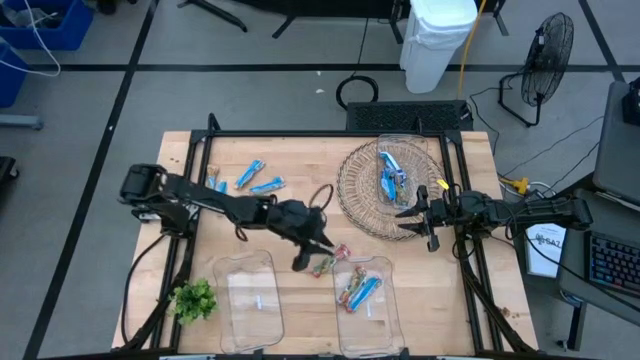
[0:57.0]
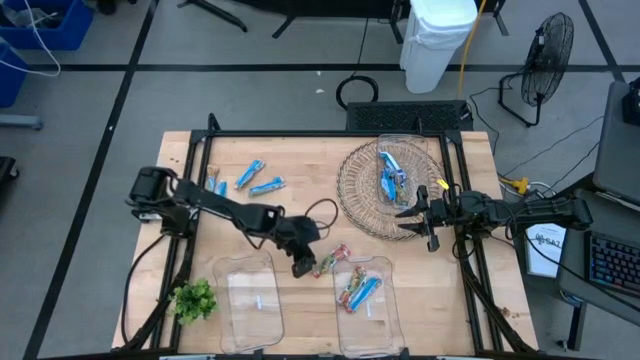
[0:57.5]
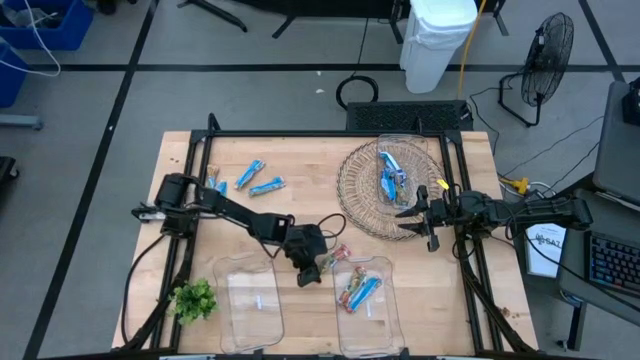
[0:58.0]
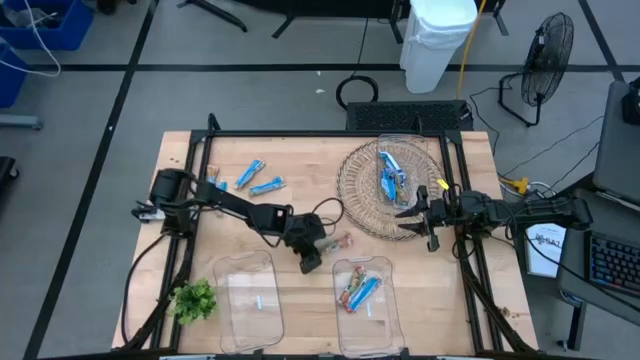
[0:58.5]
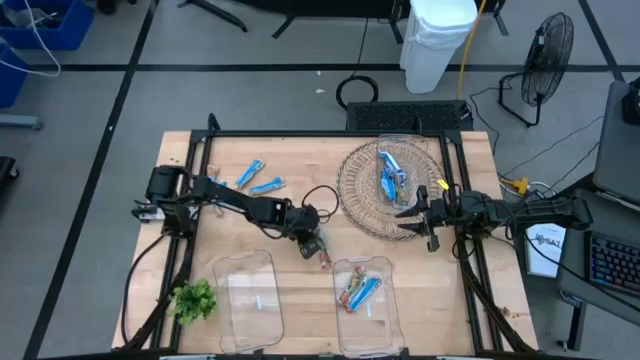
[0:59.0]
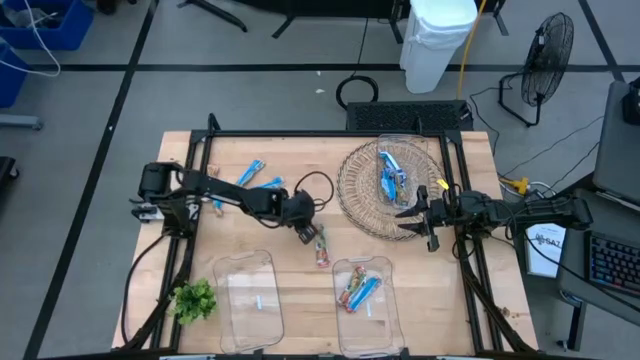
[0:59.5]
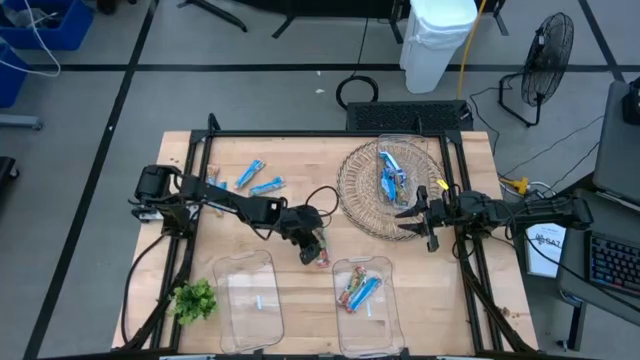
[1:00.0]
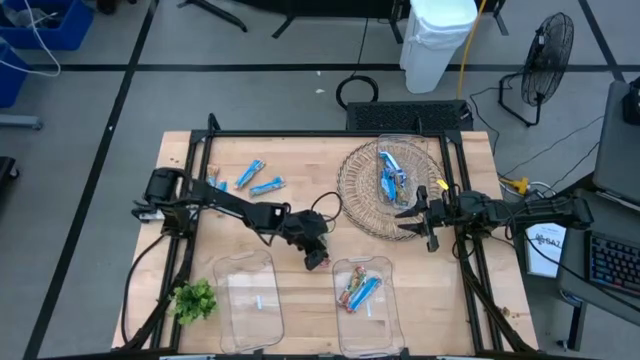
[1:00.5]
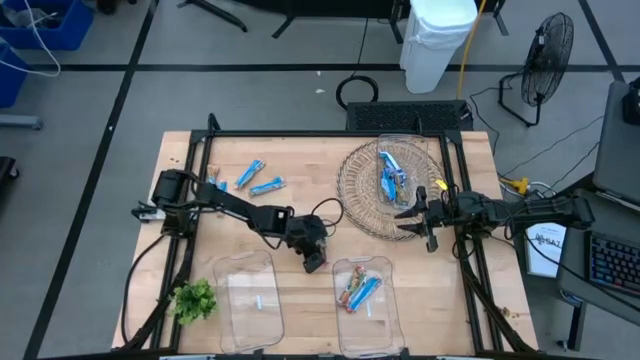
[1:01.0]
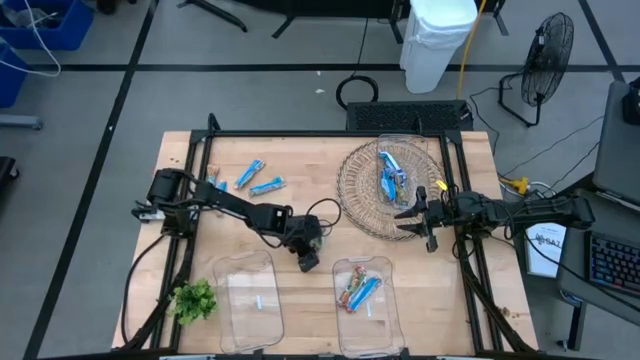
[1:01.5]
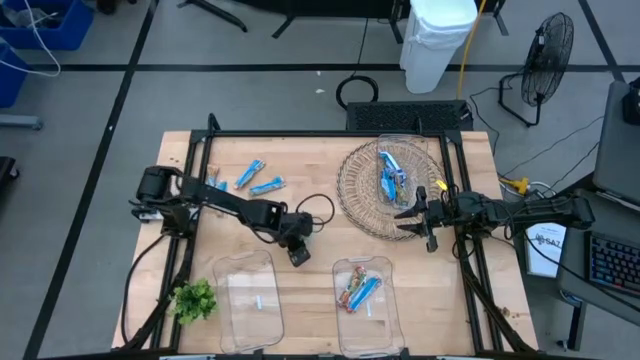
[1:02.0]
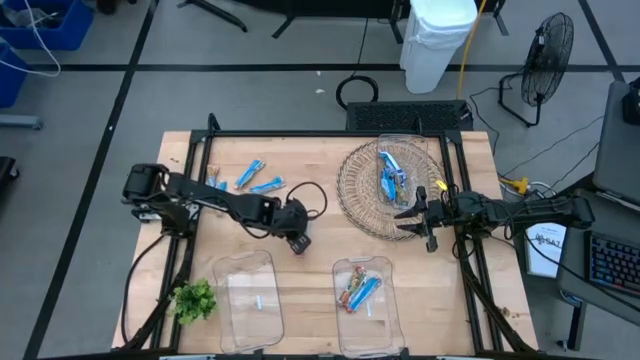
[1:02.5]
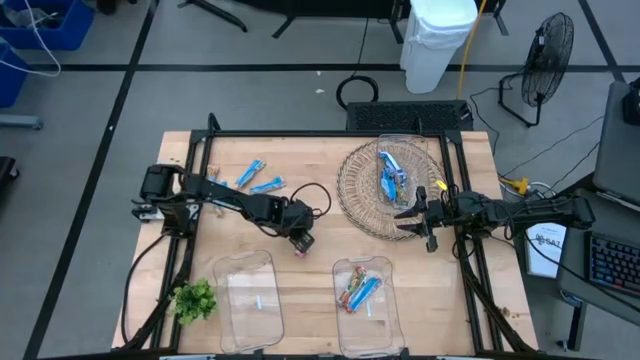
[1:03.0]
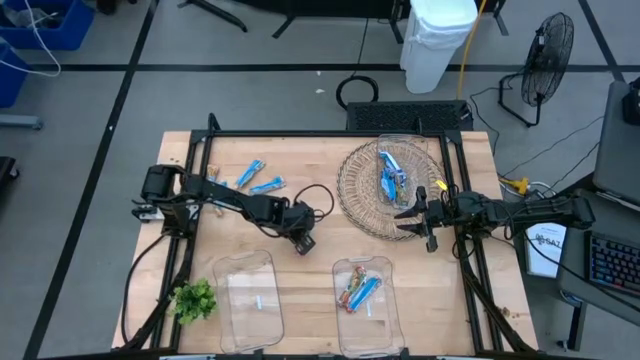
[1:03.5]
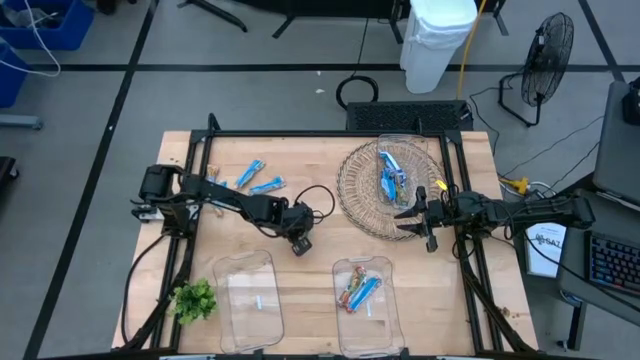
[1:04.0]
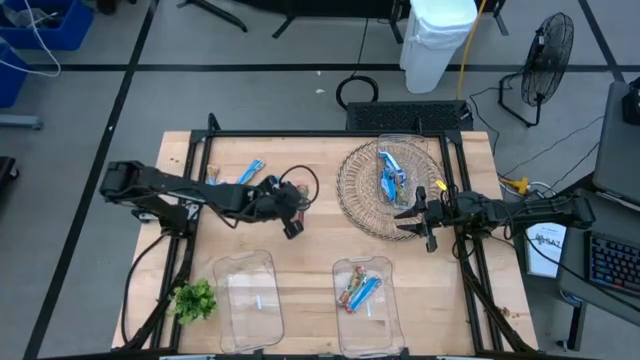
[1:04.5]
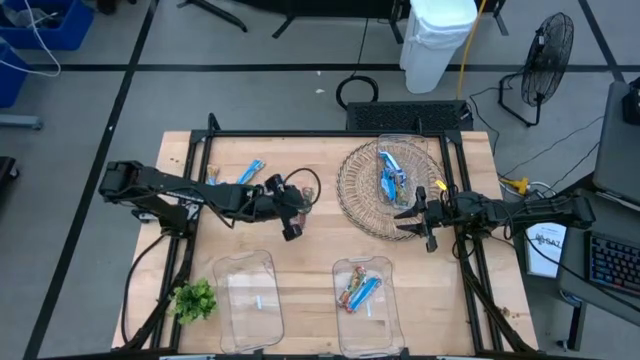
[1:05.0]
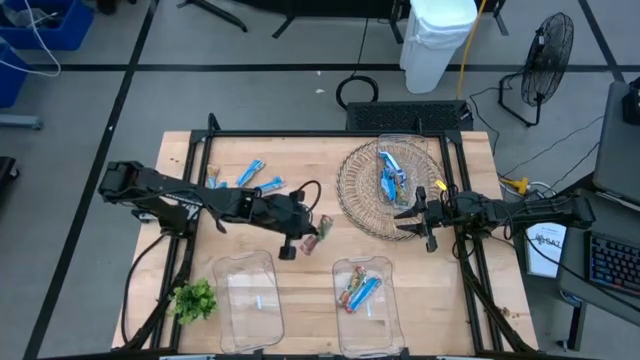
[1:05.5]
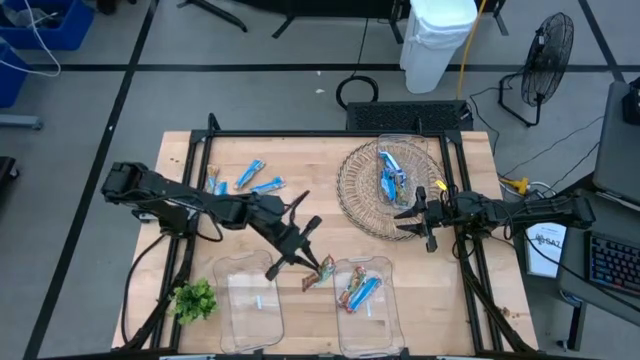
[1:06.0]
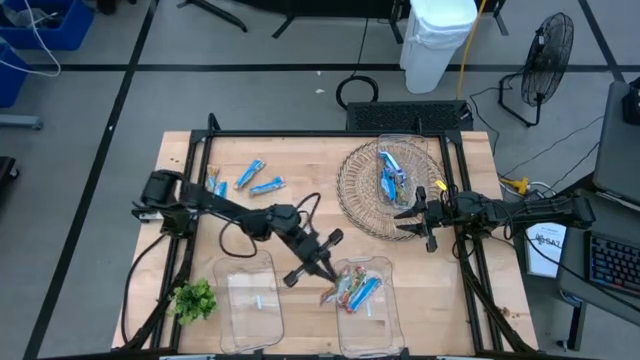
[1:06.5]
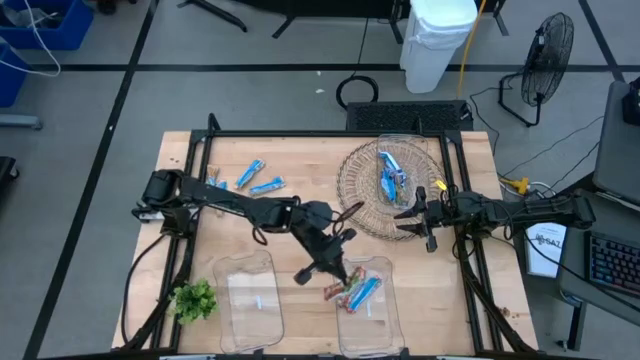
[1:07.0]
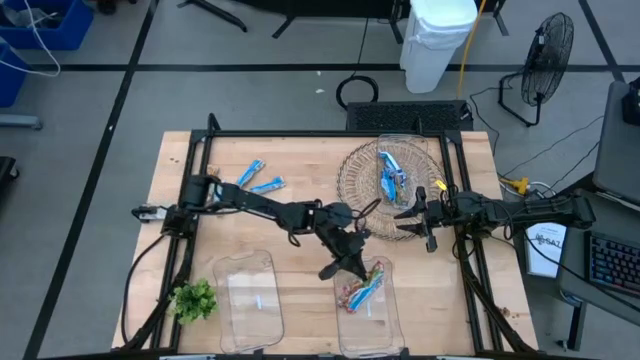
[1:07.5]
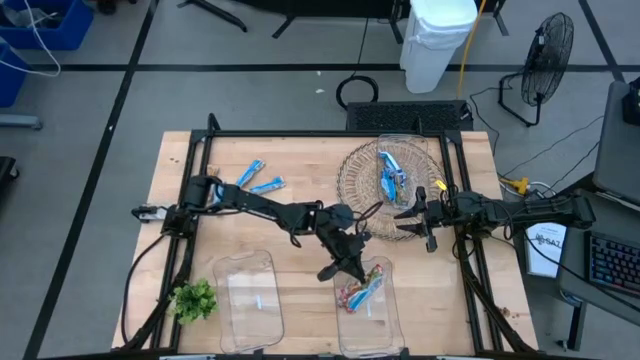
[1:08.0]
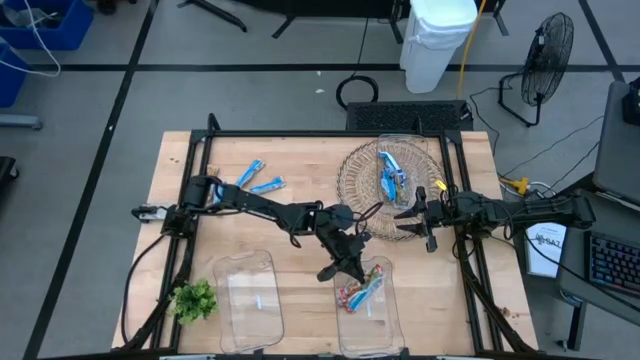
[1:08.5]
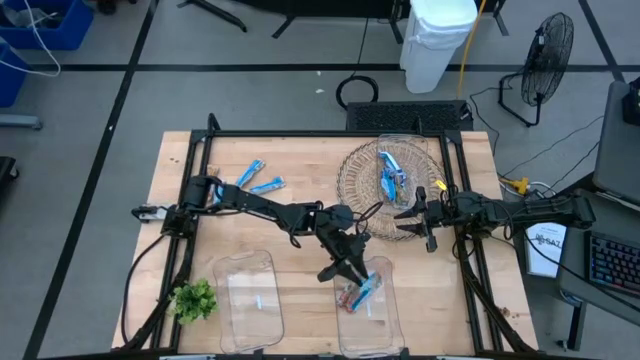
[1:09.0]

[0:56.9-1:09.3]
Task: Pick and place Granola Bars by type
Put the red granola bar into the bottom middle transparent bin

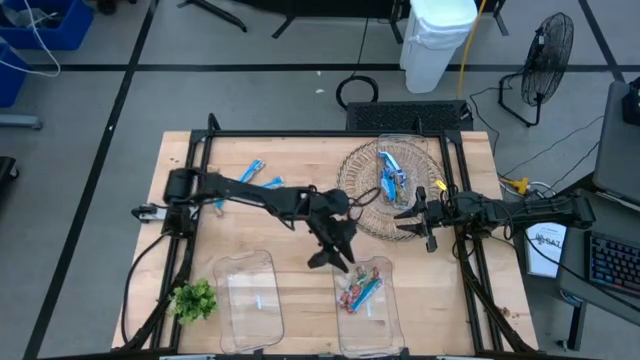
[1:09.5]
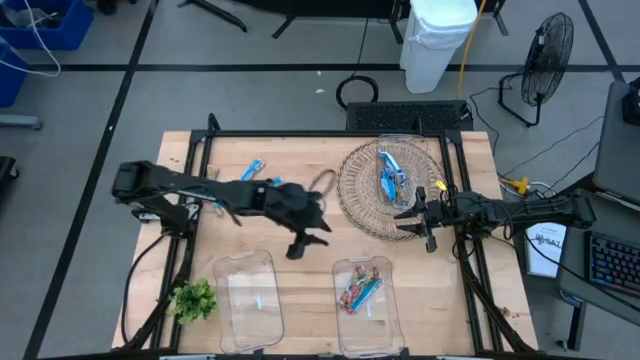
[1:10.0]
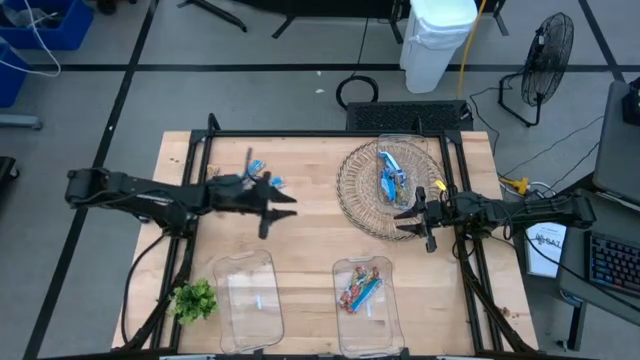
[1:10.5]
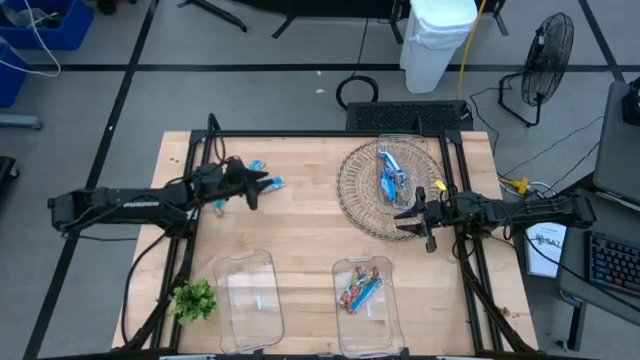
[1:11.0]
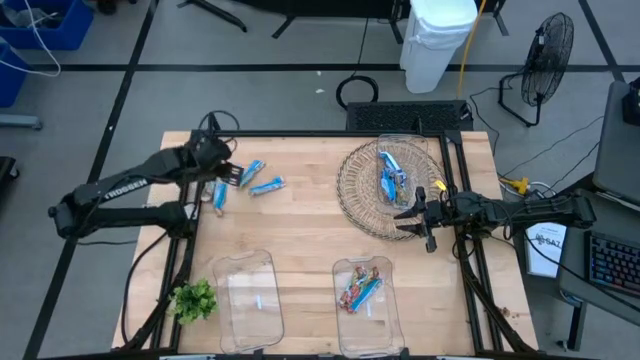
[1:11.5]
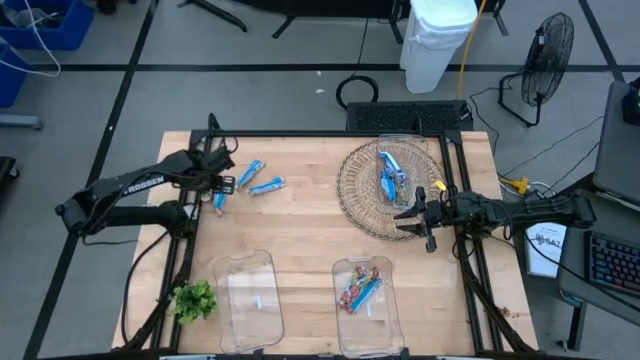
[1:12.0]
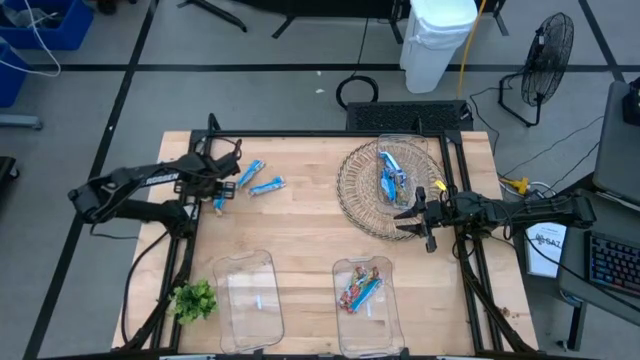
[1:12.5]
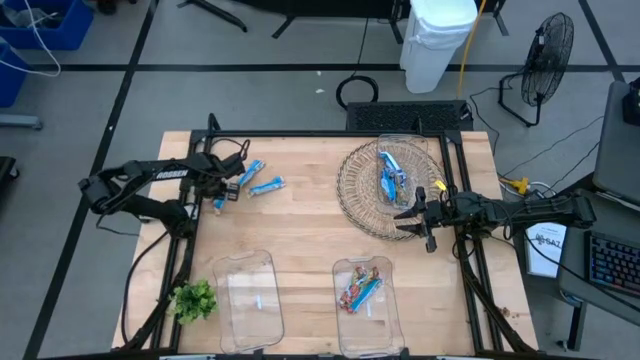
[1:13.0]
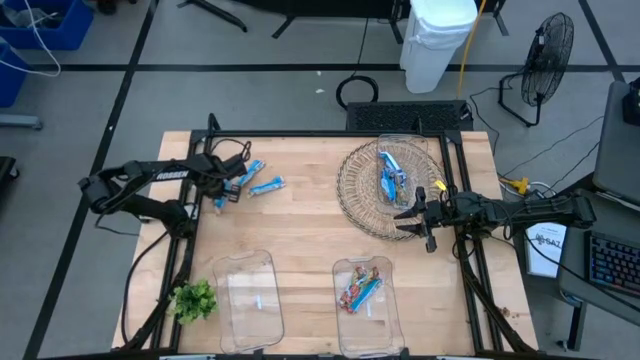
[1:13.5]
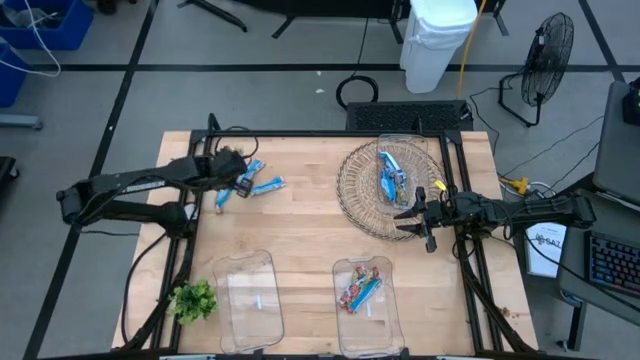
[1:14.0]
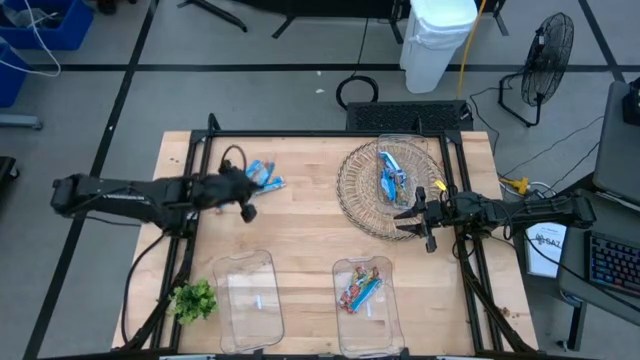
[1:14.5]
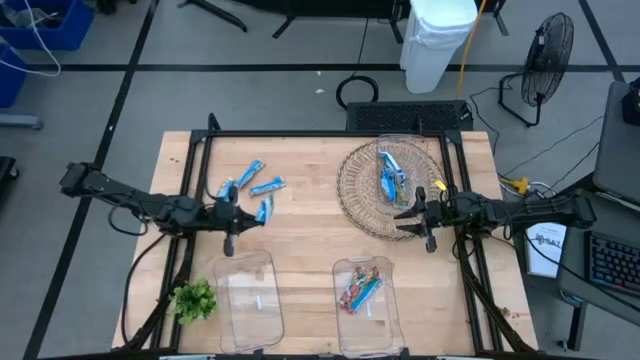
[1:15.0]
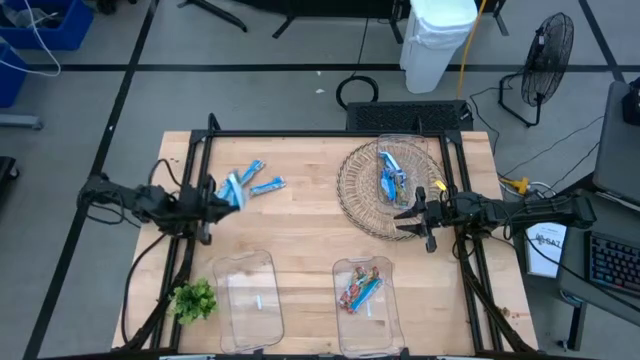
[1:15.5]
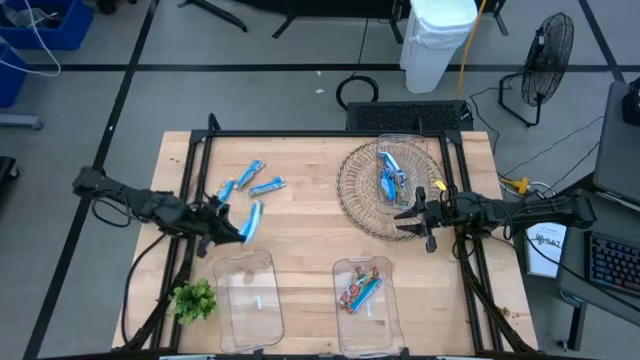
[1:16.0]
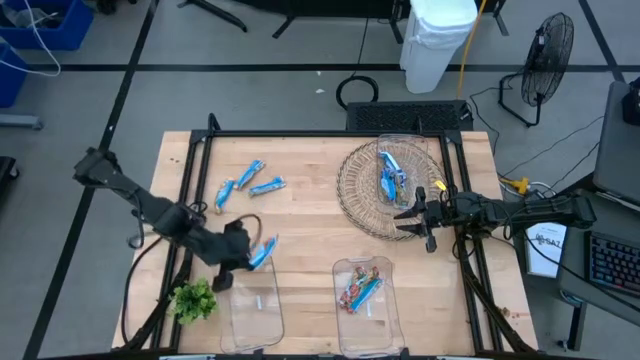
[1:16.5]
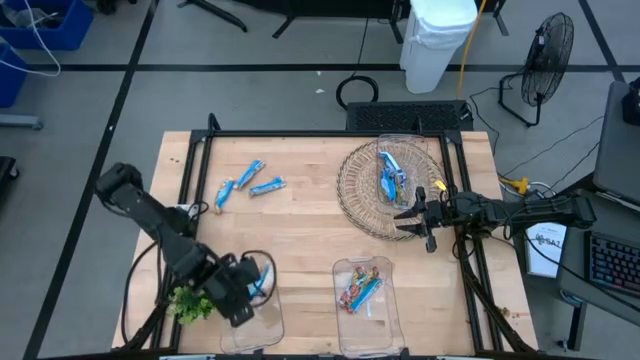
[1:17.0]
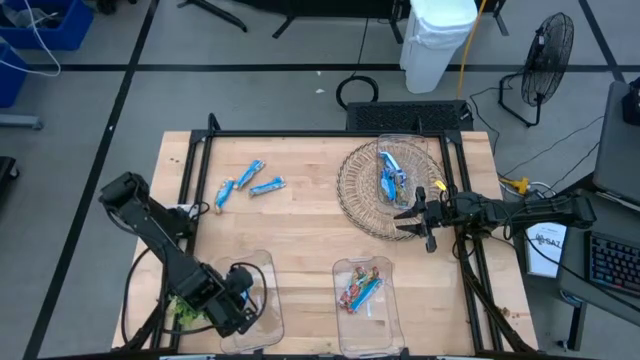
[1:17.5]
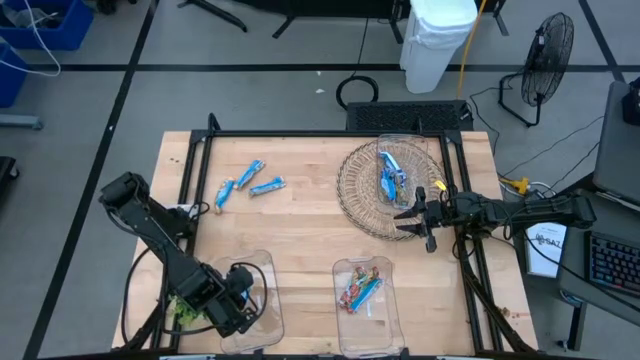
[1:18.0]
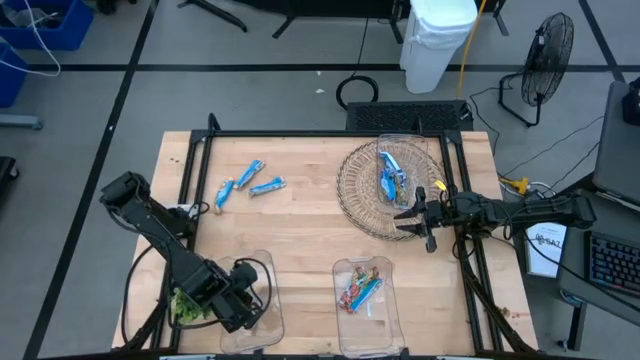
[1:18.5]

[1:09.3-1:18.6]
Put the orange granola bar into the bottom left transparent bin
